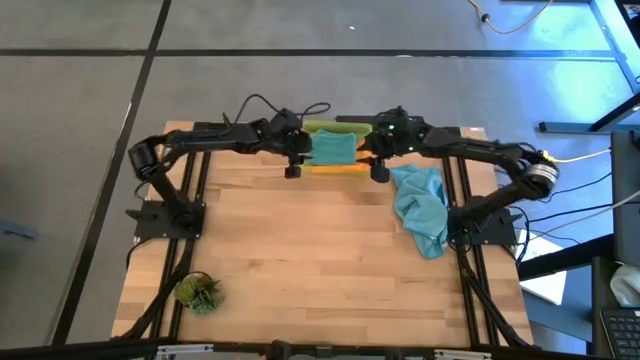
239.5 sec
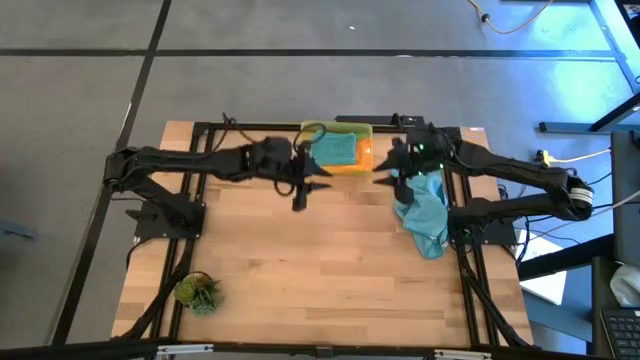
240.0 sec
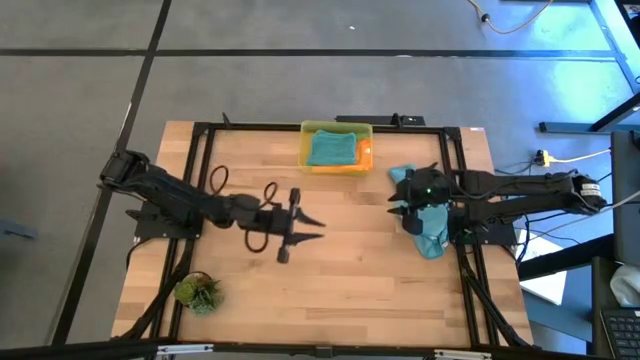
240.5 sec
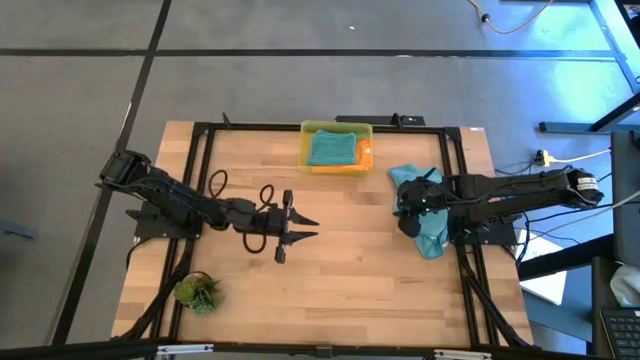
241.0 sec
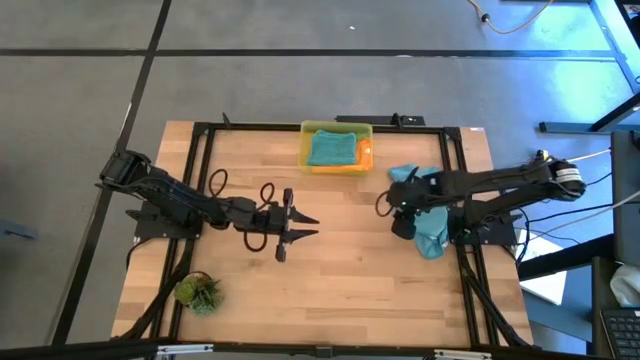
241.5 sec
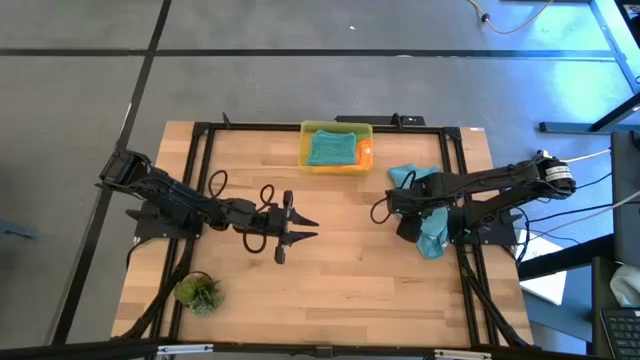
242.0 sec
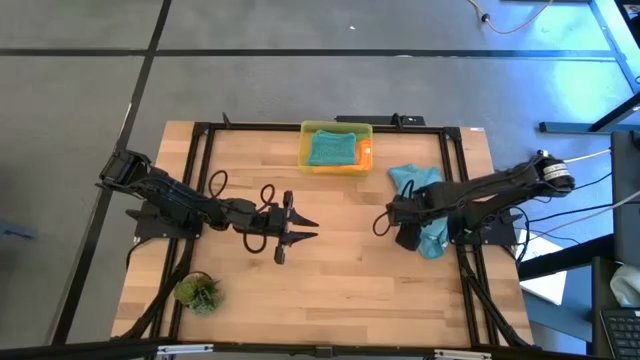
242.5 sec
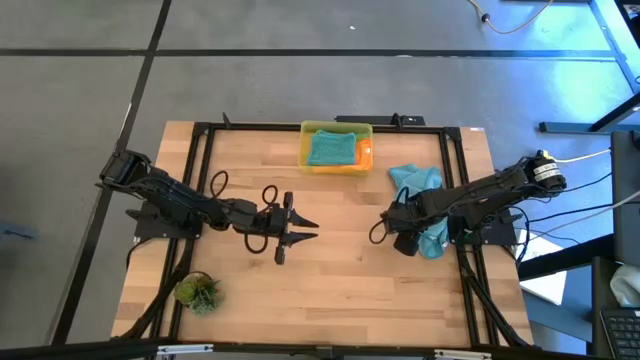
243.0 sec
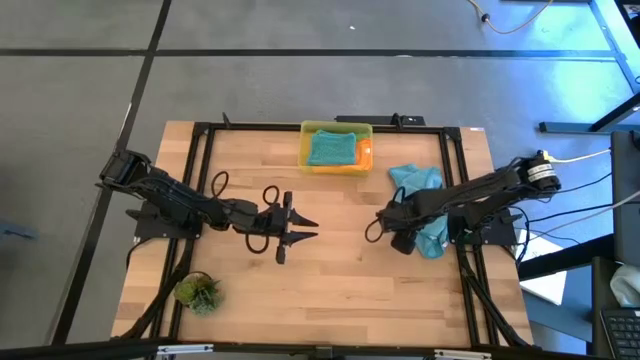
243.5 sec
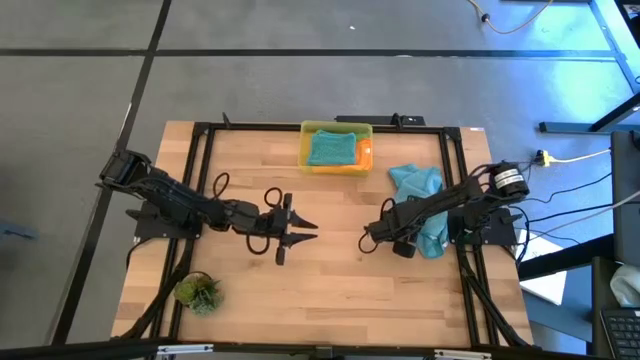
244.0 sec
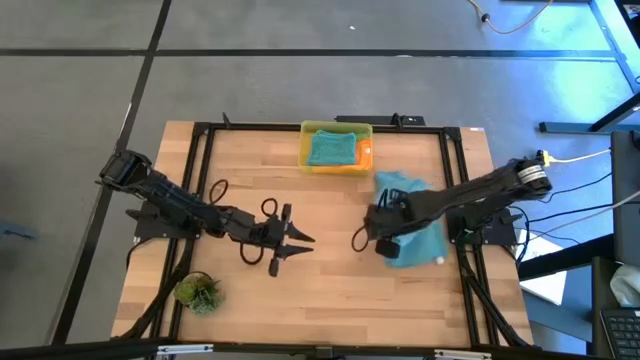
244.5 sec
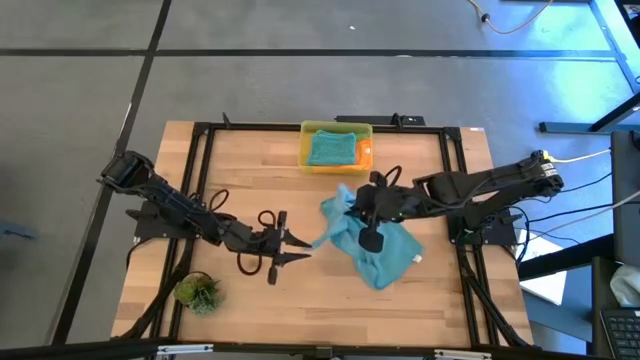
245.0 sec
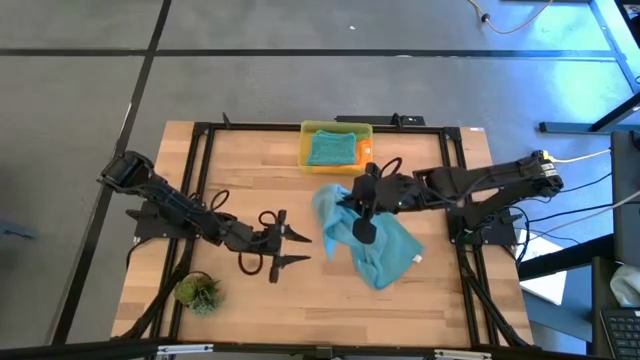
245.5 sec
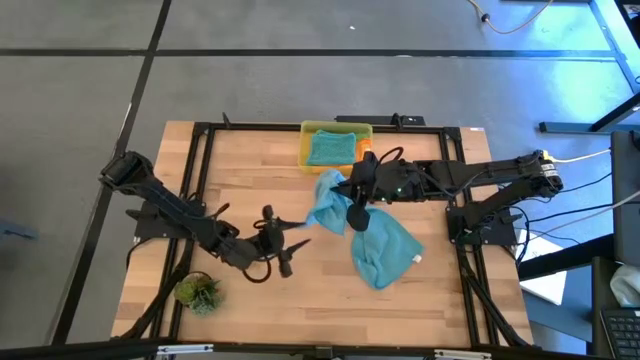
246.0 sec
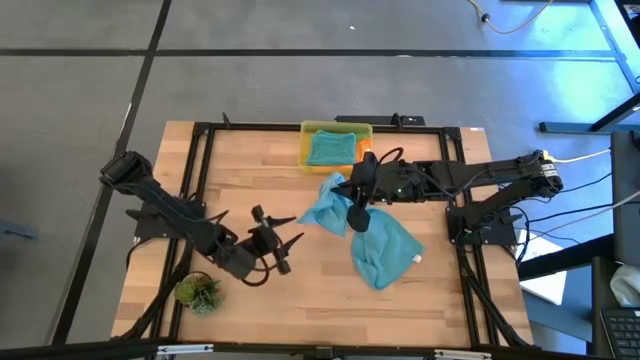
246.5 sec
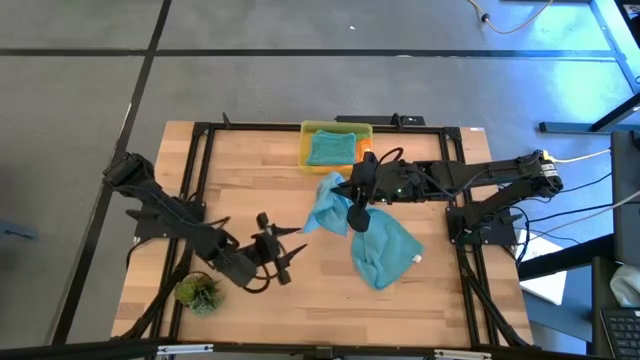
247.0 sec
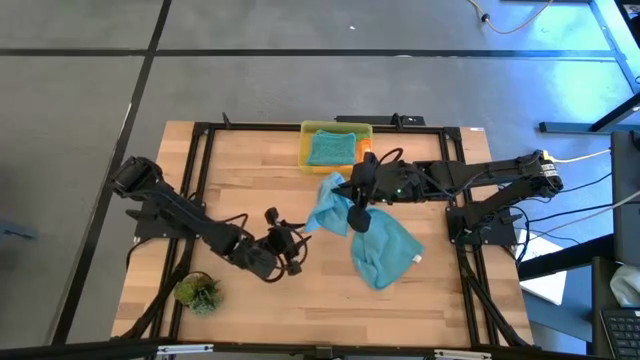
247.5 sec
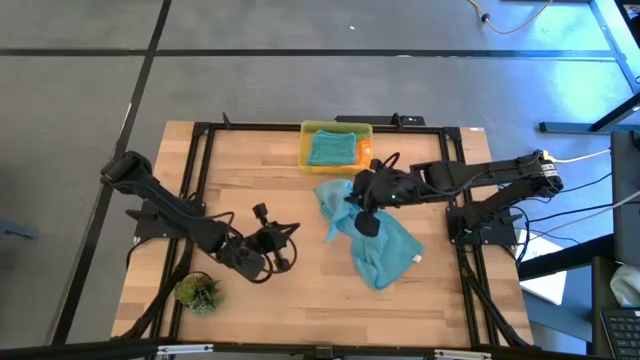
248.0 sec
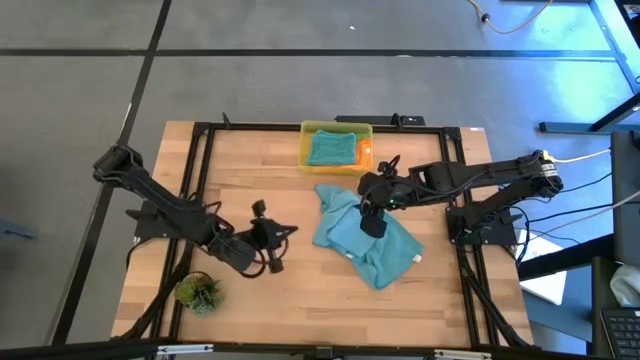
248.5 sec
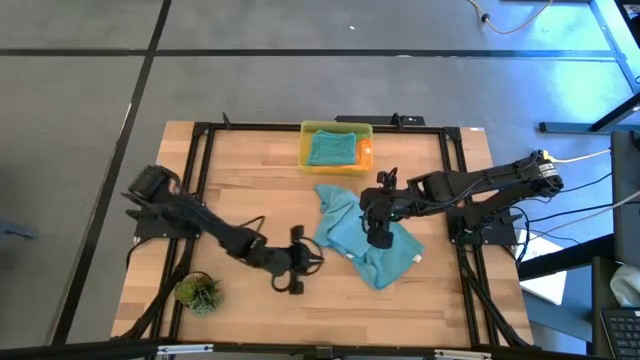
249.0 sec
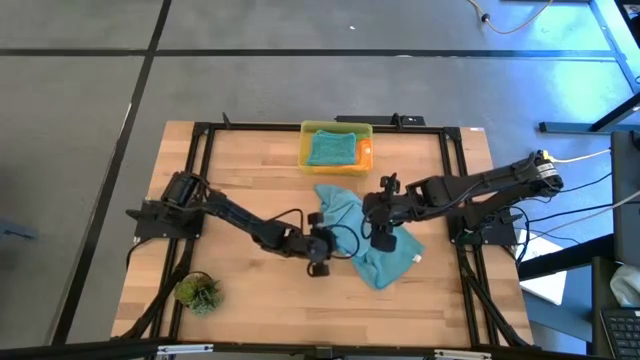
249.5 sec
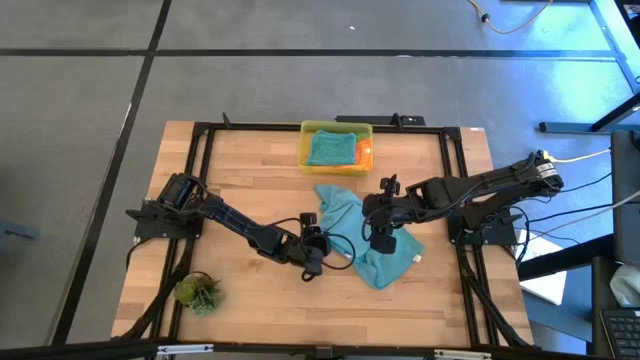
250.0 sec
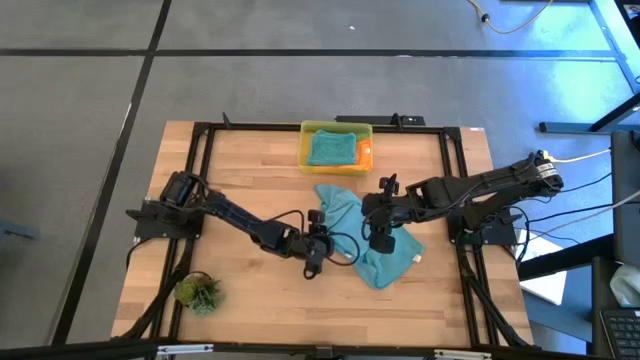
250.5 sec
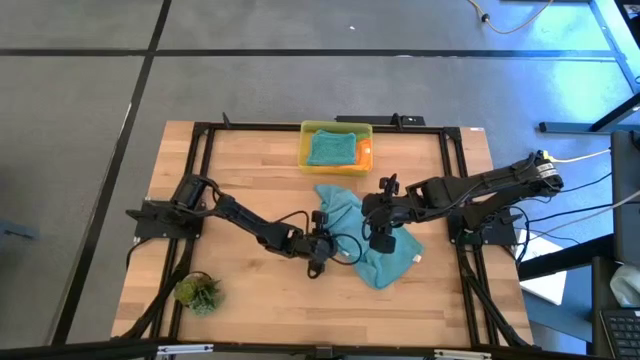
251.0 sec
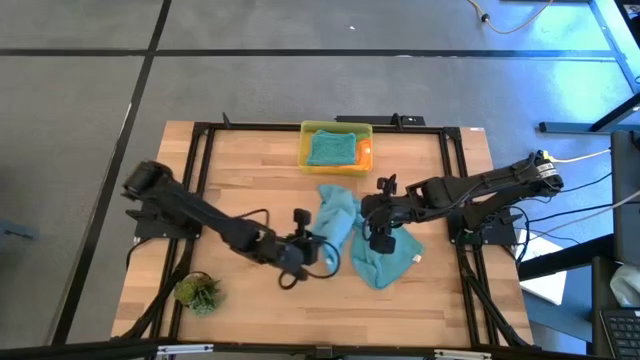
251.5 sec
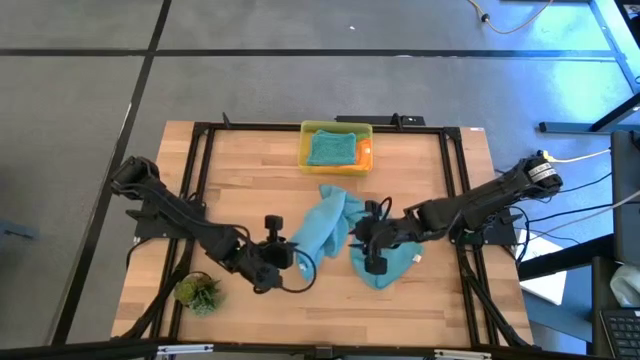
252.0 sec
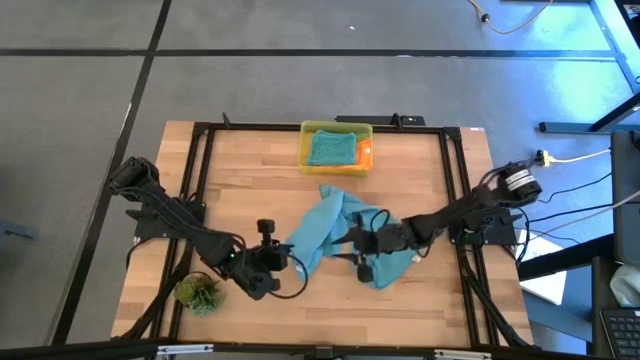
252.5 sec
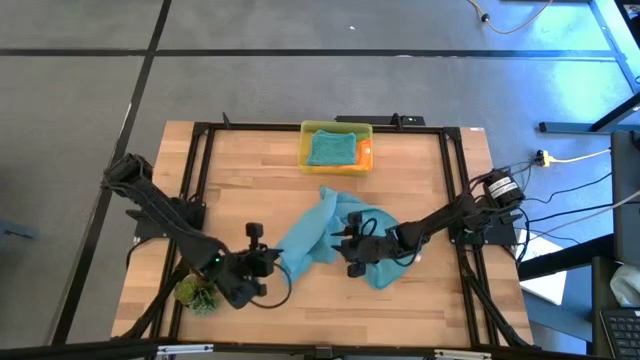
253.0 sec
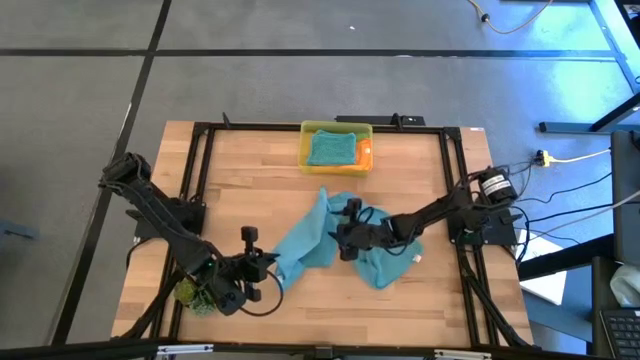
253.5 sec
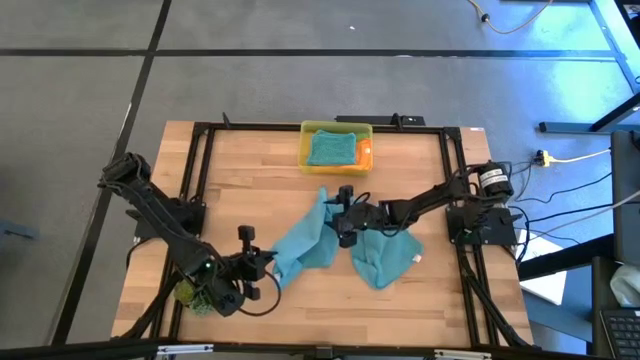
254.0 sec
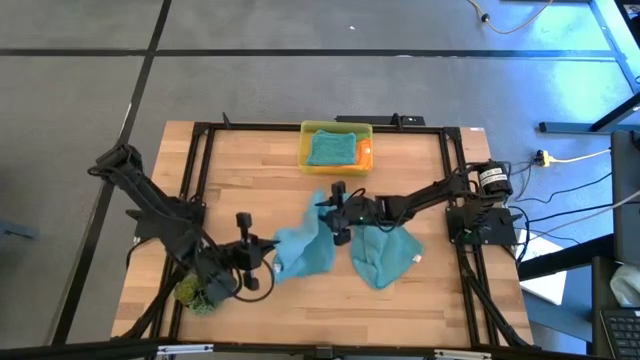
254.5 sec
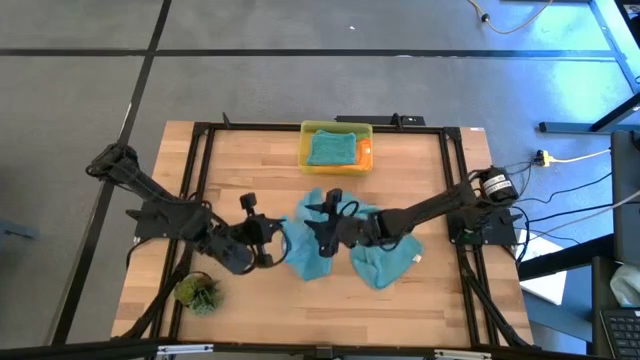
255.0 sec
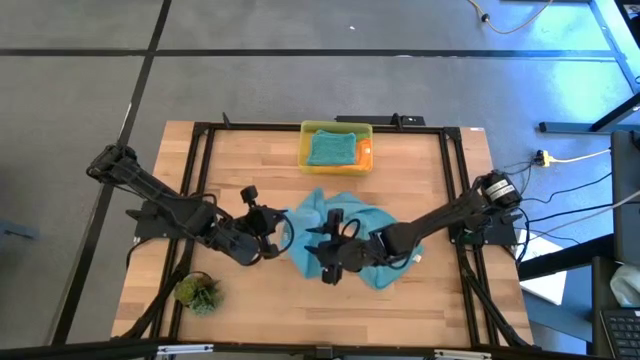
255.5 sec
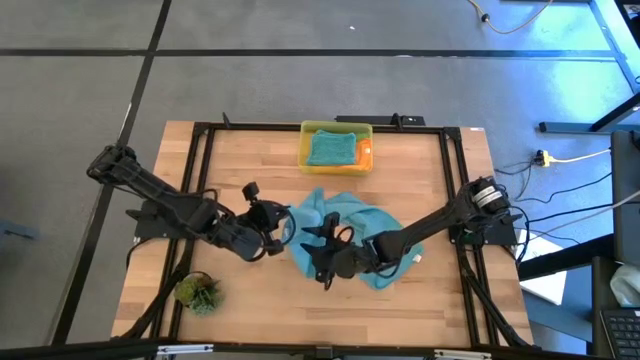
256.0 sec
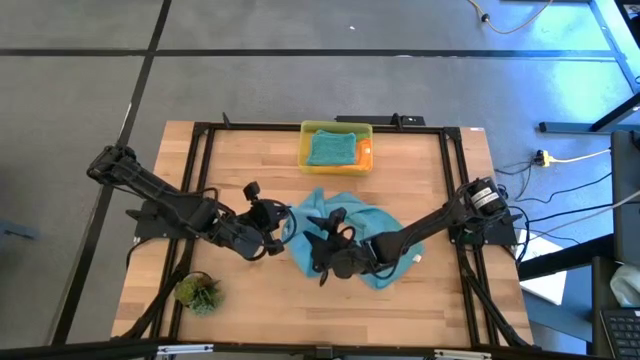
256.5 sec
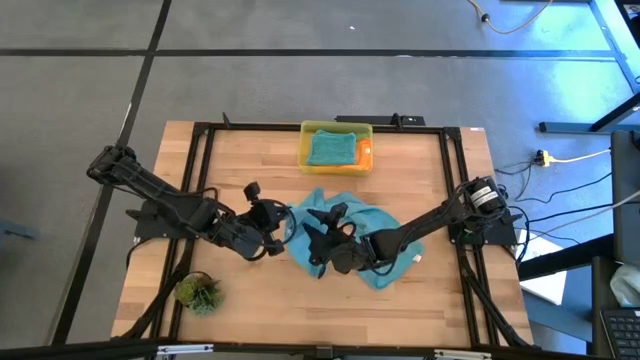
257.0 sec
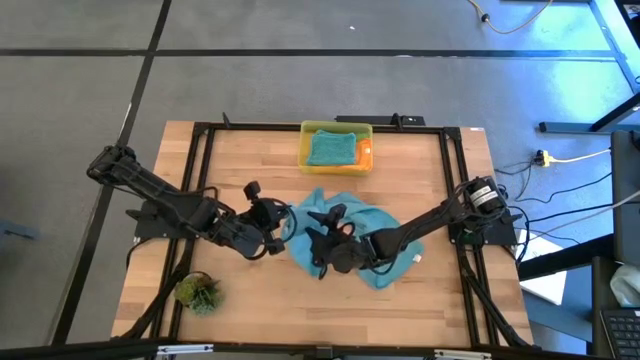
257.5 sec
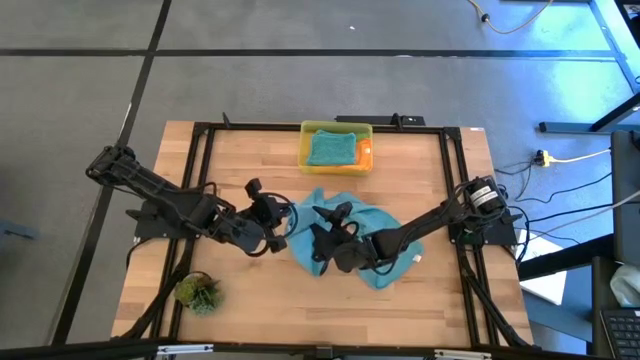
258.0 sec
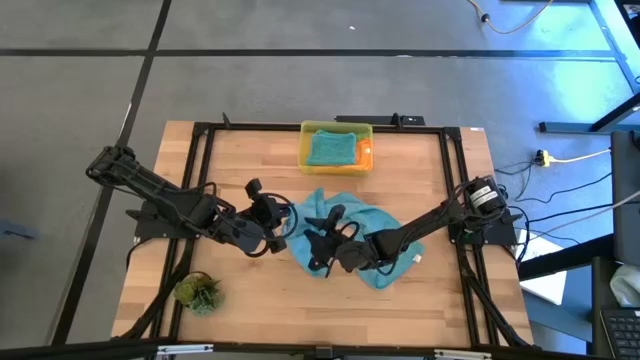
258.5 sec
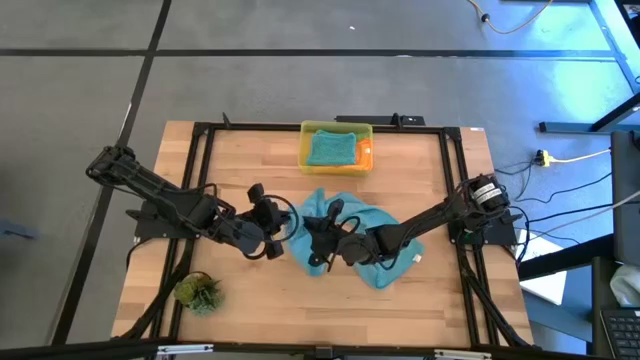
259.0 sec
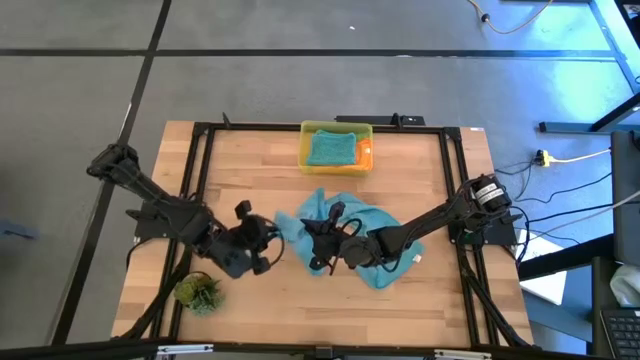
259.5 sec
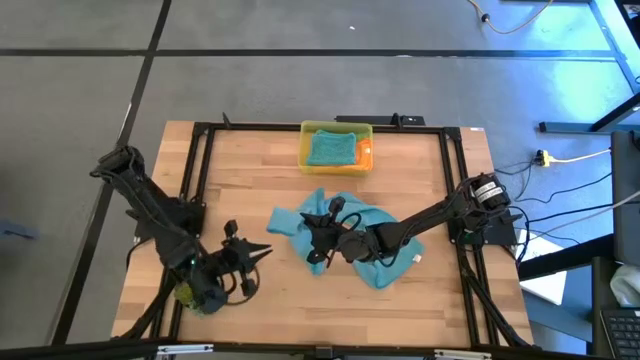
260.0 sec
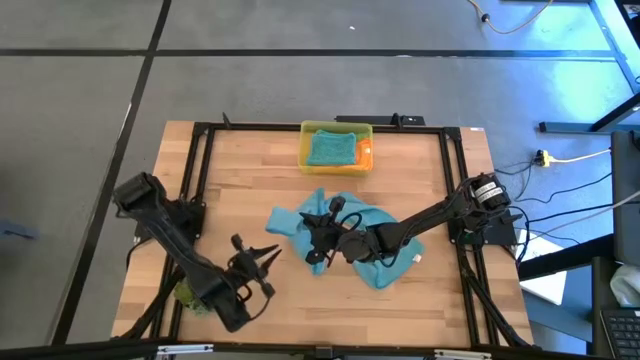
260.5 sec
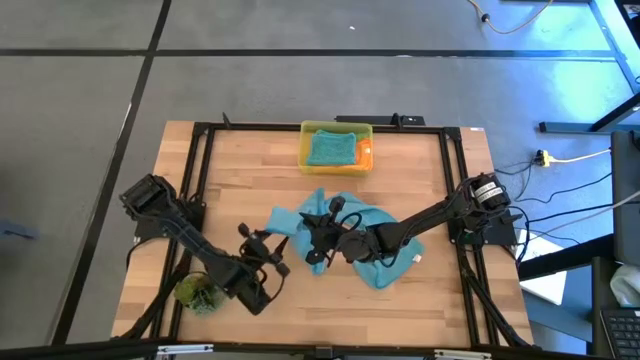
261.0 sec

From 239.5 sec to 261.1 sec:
Task: Fold microfiber towels
Fold the top blue microfiber cloth

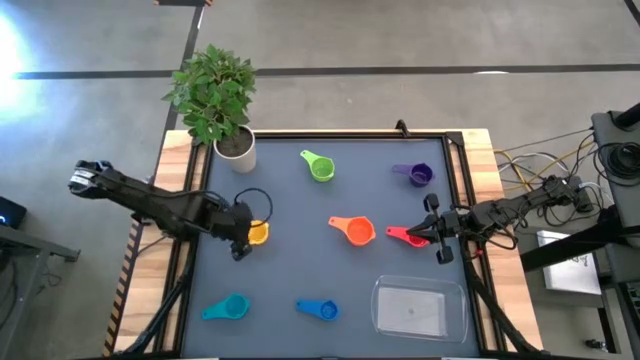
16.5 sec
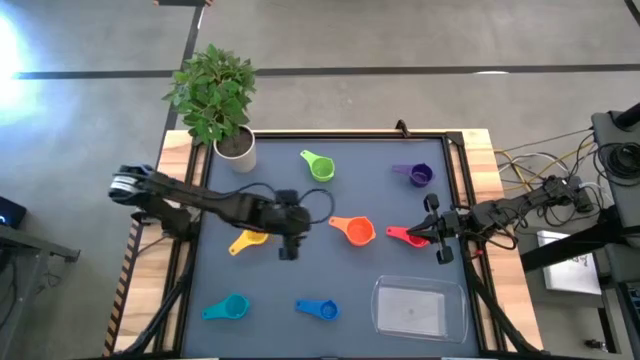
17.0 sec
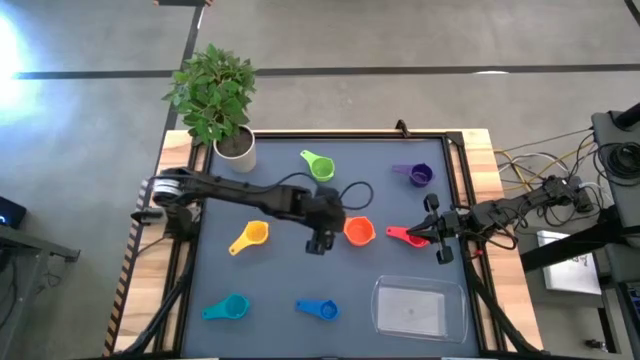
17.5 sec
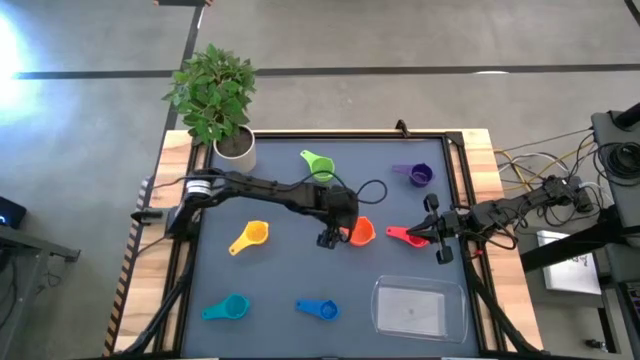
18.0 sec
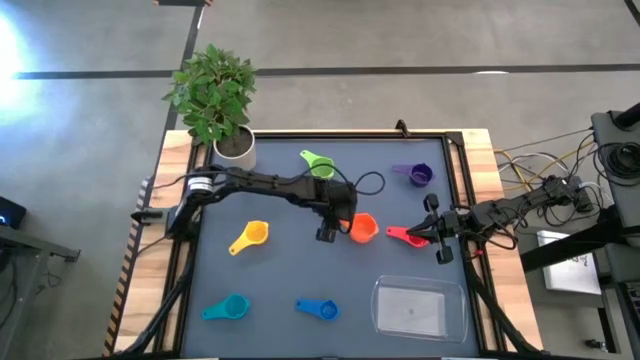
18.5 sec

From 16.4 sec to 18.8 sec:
Task: Nest measuring cups in basket
Adjust the orange measuring cup
